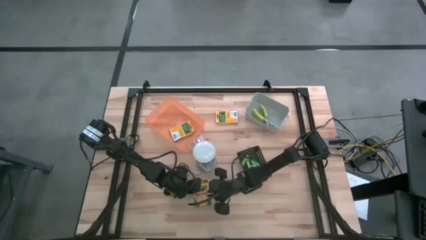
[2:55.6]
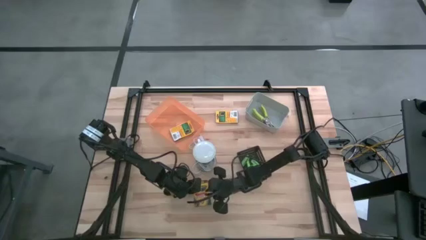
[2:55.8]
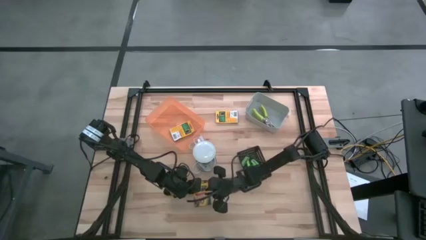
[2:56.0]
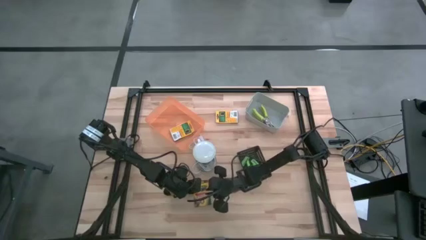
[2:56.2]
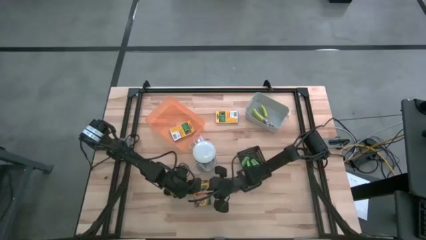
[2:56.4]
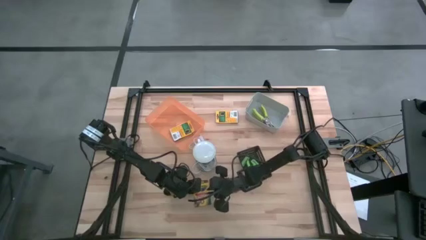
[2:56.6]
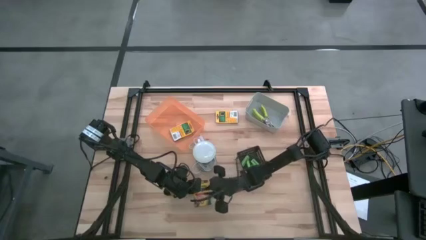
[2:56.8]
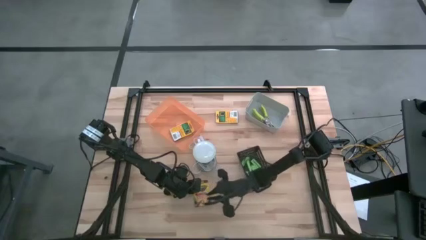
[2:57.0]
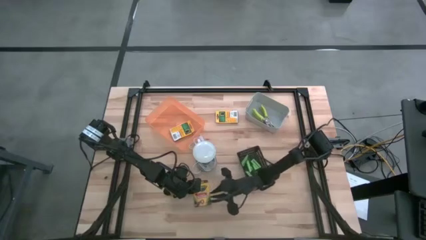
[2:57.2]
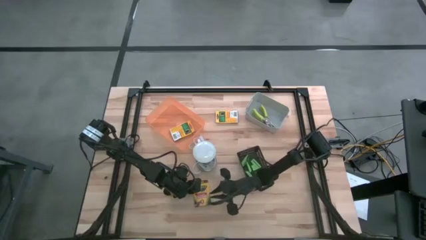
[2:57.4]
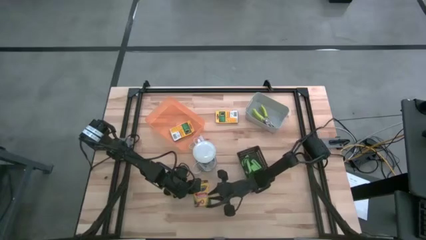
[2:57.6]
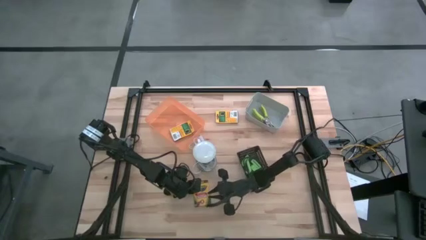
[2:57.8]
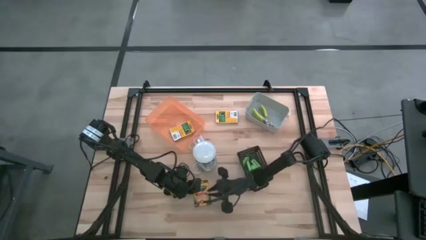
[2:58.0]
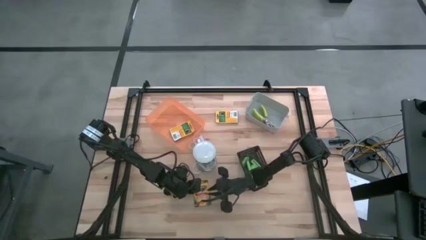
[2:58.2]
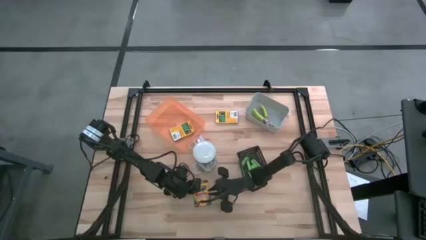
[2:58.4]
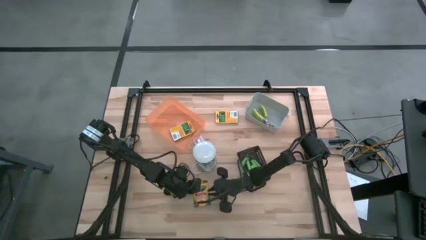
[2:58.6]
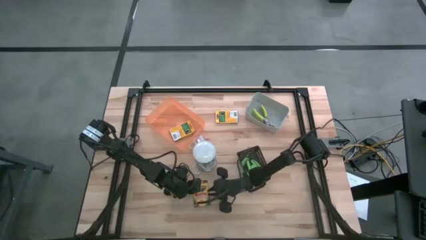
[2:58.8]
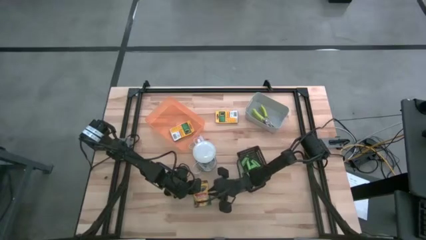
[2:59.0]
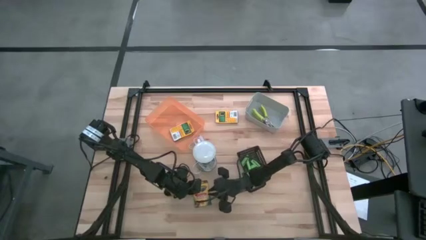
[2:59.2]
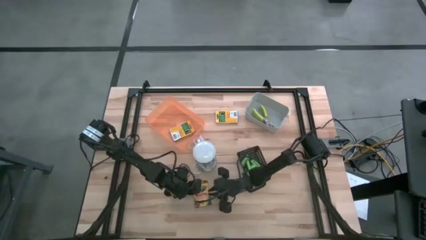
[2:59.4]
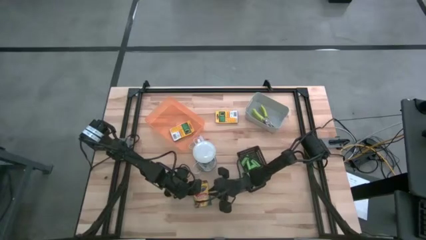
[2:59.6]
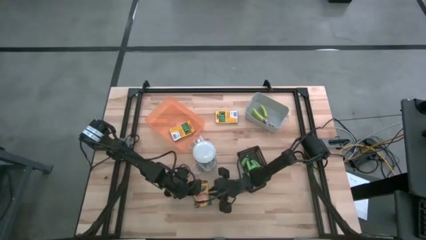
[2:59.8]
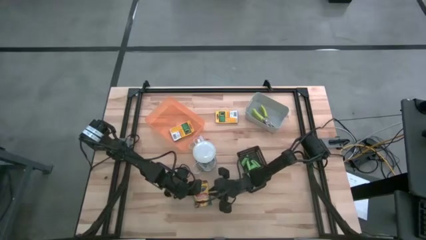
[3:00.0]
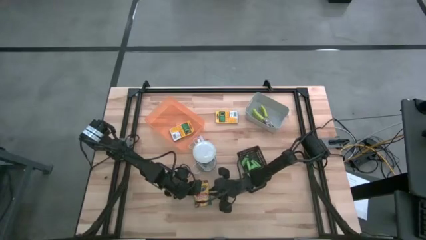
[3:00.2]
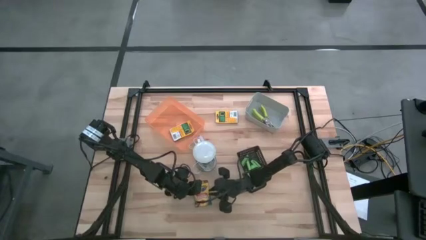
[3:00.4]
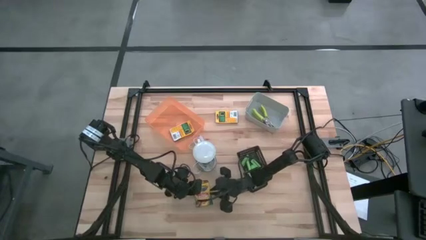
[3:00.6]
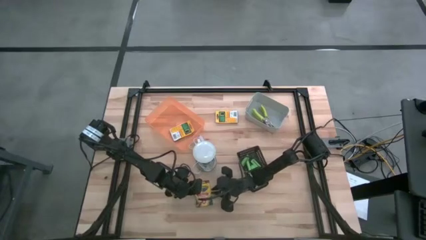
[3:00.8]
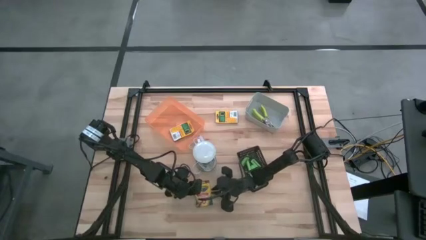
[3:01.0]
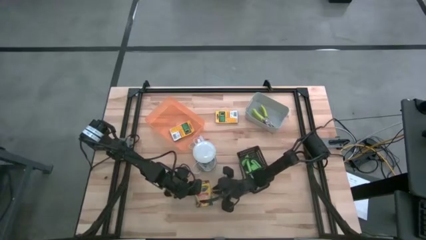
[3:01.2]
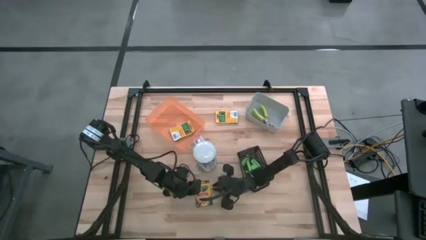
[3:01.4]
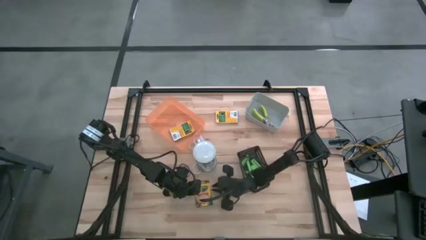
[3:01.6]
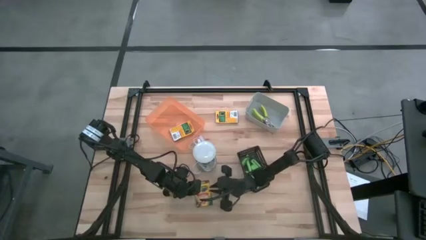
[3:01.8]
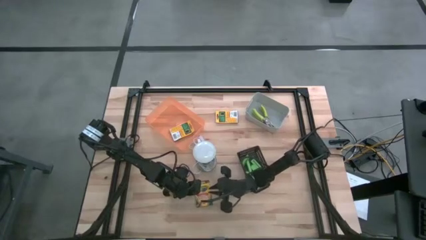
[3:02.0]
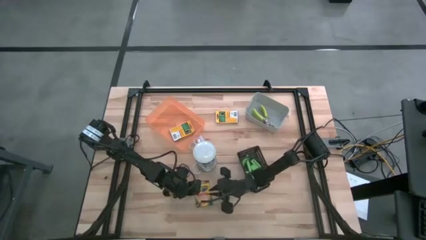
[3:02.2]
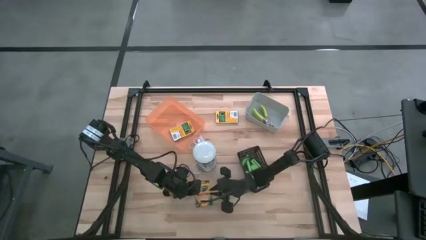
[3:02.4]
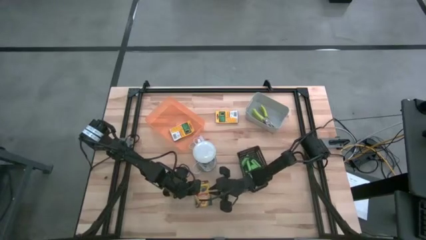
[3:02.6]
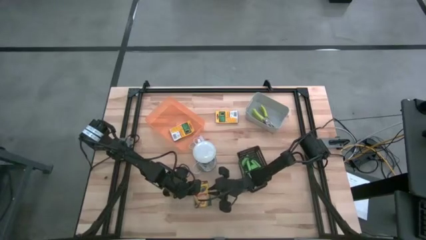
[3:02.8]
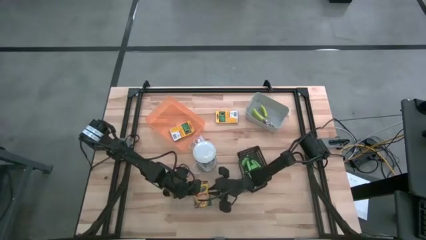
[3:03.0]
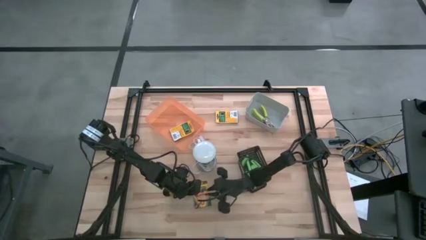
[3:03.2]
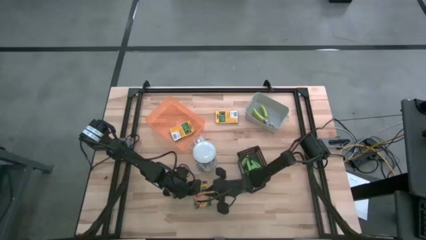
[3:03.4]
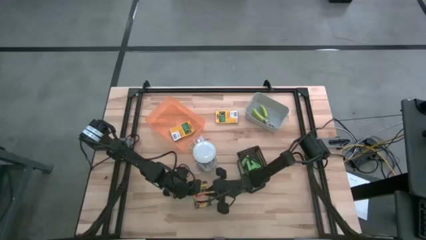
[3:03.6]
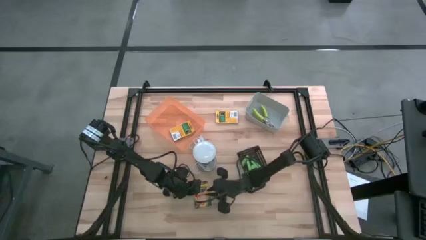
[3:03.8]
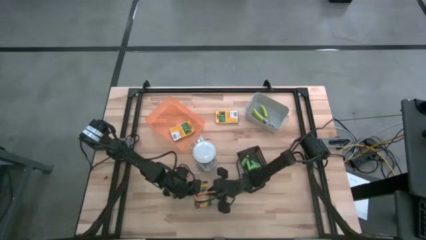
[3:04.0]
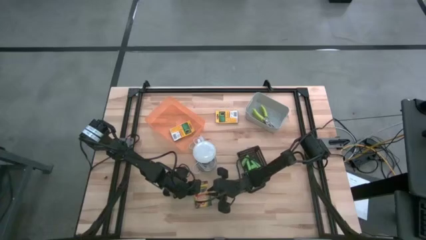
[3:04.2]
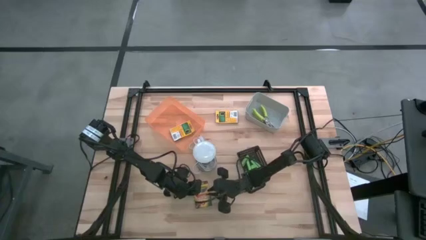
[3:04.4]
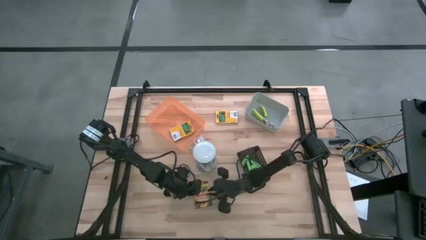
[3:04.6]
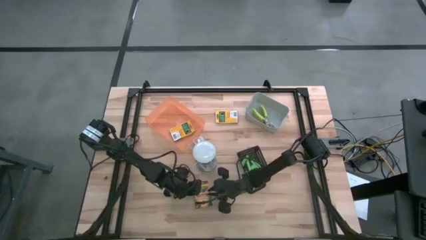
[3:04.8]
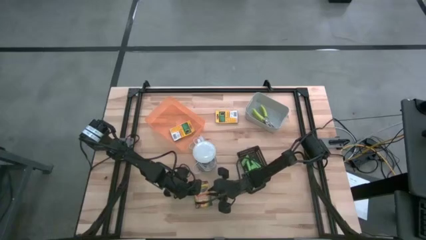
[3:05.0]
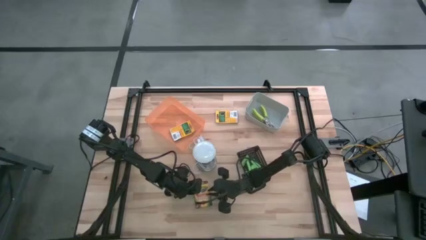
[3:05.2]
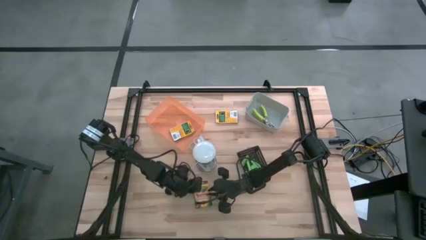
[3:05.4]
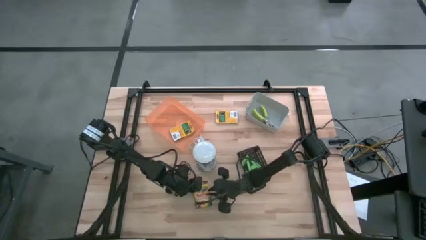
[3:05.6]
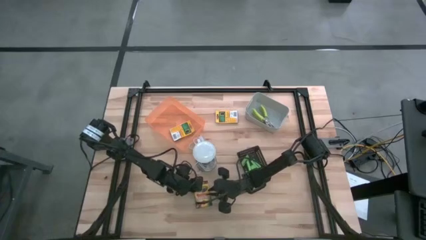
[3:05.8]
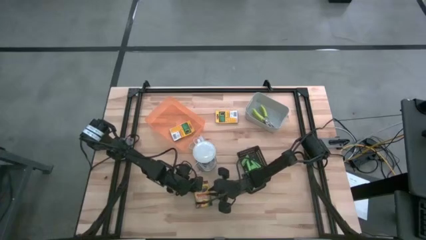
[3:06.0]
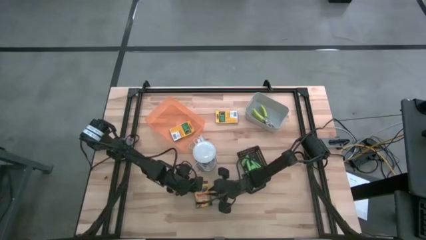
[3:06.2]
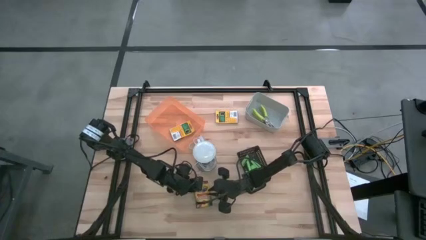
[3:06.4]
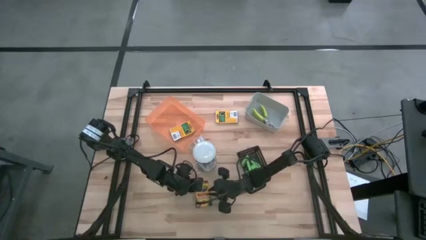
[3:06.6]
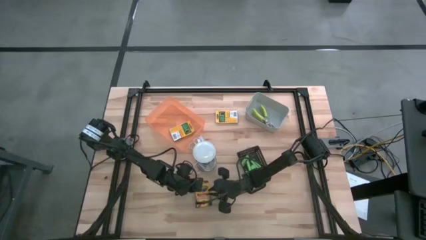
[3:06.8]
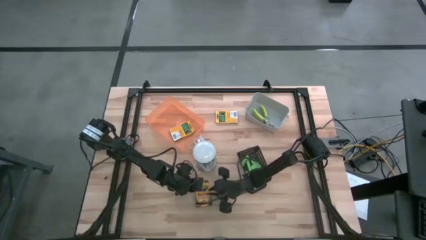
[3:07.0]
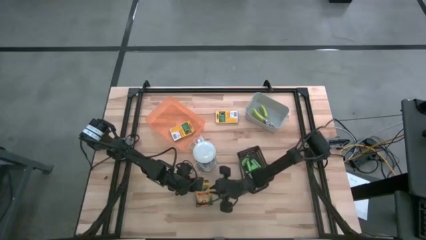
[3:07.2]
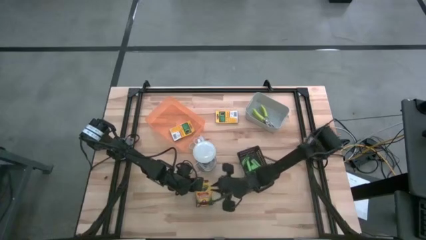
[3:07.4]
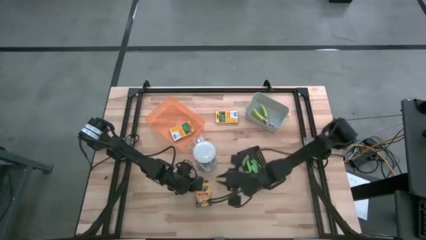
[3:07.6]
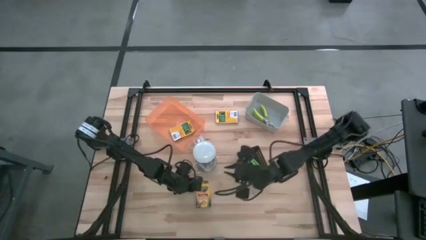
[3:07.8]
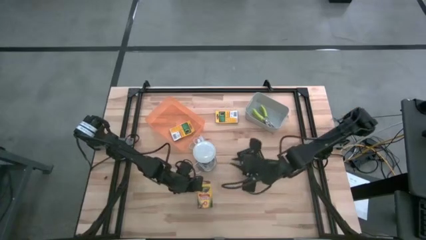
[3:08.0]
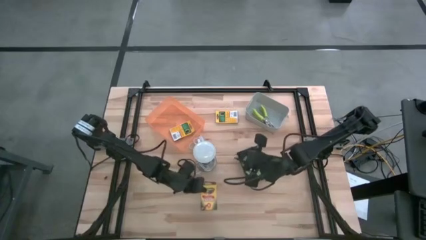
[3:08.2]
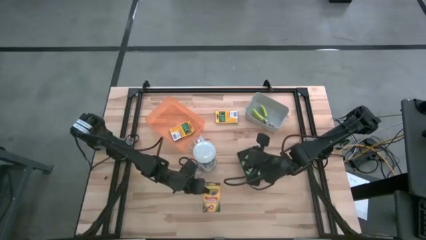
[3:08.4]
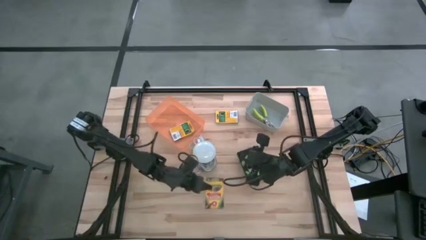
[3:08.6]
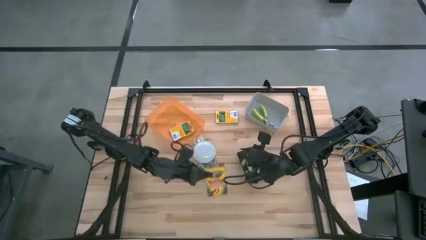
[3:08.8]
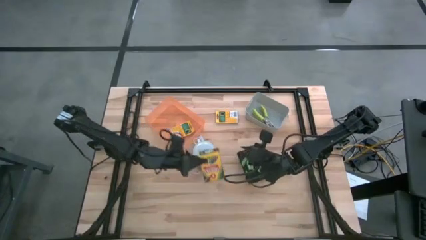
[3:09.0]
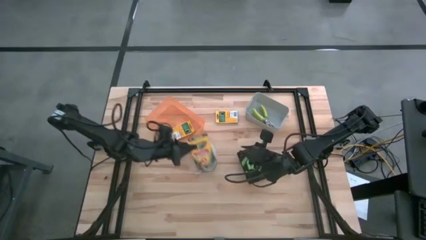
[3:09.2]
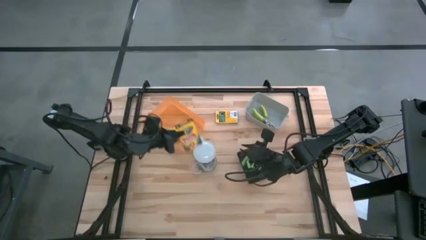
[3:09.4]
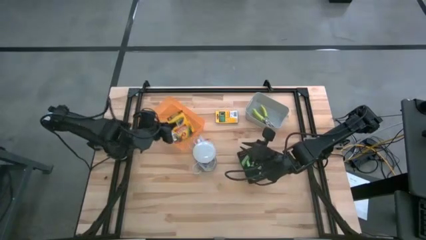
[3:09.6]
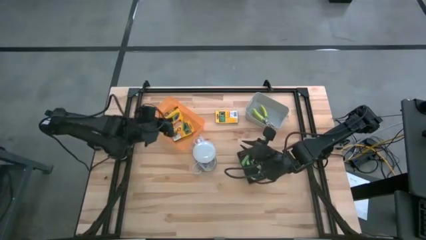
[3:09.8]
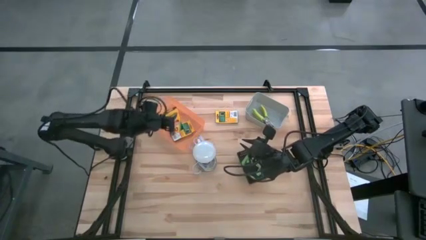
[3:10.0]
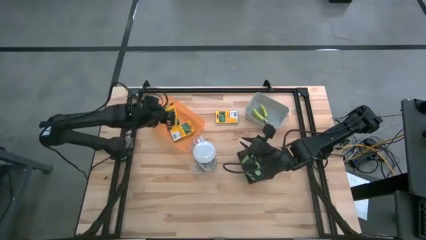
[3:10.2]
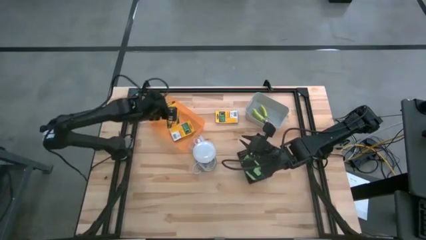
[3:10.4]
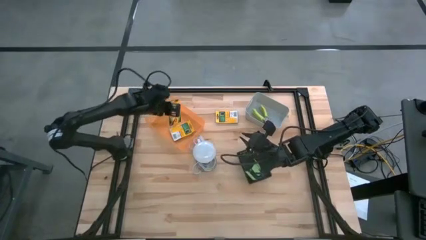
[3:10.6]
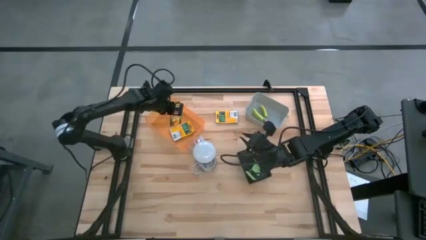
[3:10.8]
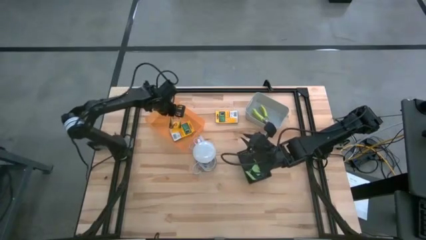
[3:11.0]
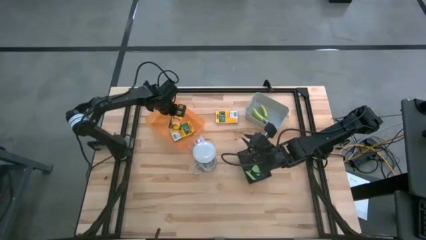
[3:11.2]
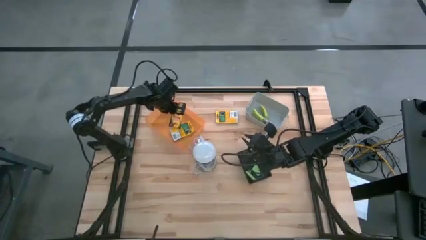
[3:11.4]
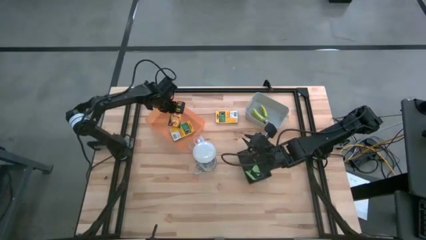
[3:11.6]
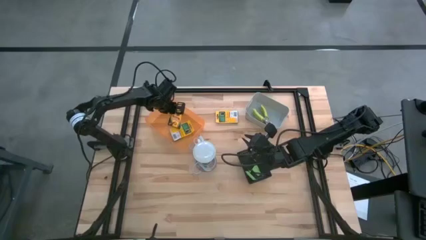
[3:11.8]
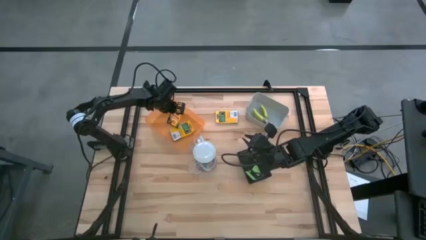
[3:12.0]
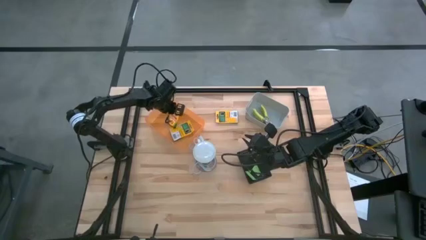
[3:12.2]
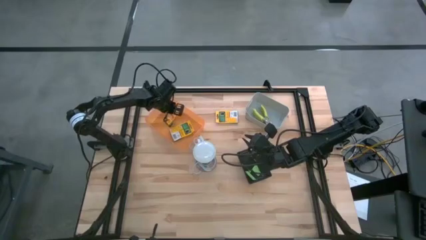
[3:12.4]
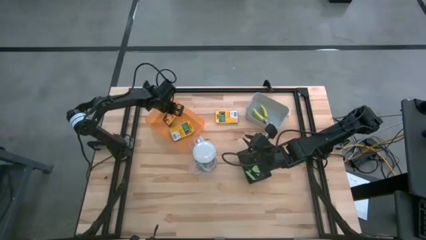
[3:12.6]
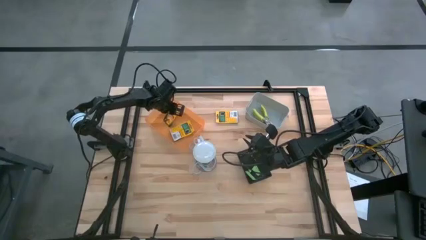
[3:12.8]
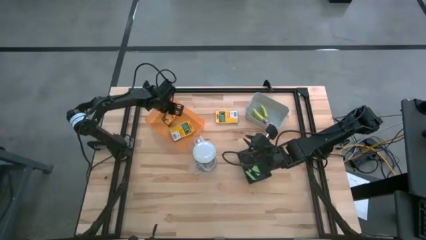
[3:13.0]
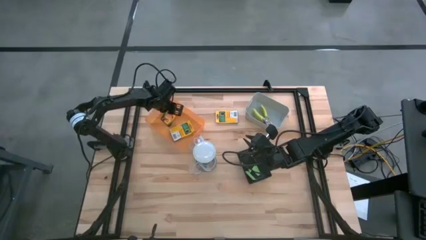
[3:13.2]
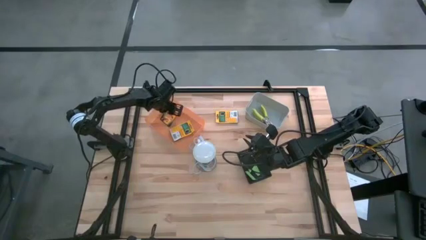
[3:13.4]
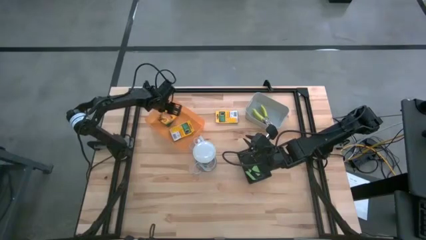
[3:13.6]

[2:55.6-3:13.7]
Task: Pick & Place School Supplies
Put the box of crayon into the orange bin
